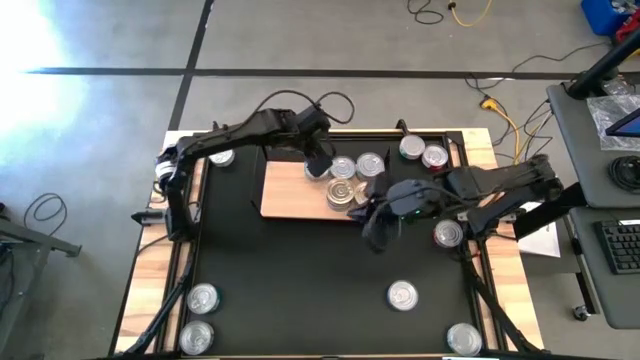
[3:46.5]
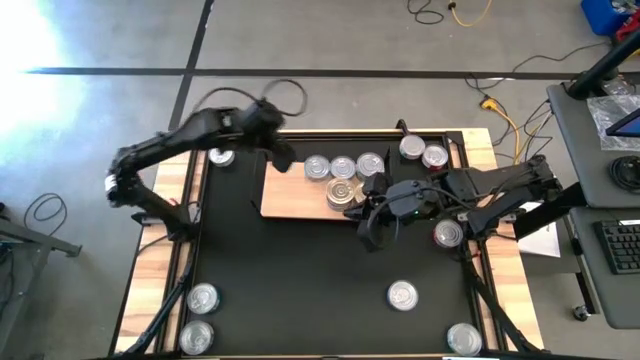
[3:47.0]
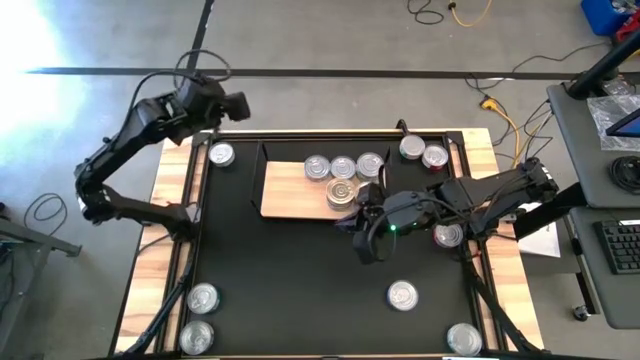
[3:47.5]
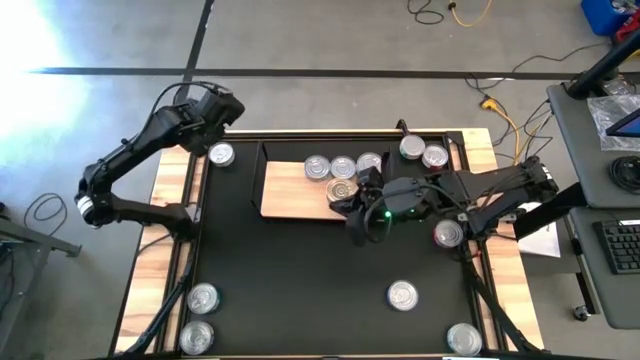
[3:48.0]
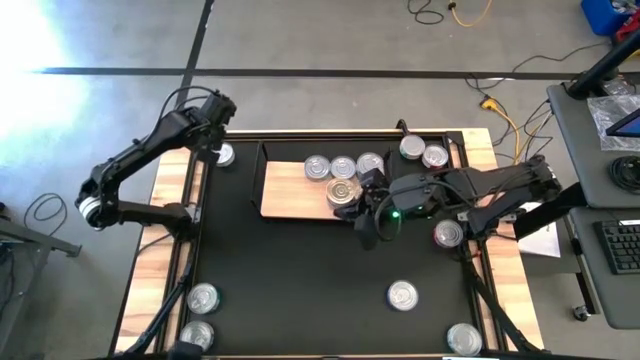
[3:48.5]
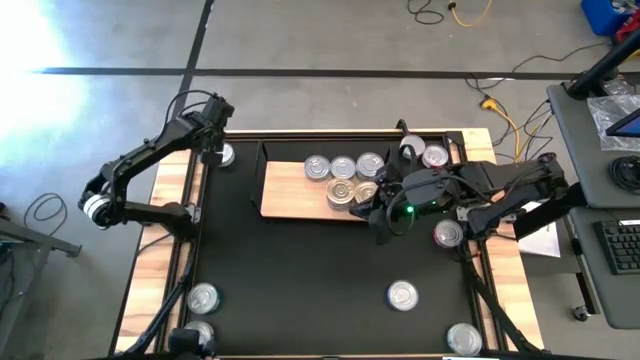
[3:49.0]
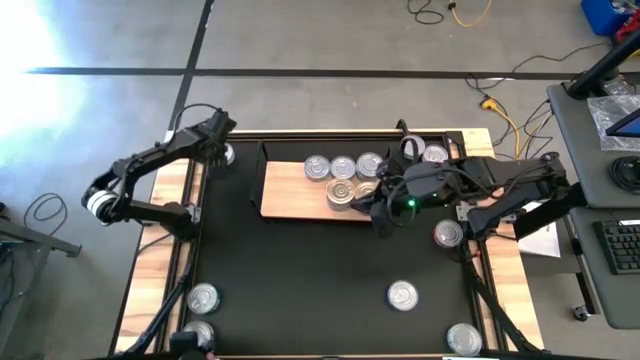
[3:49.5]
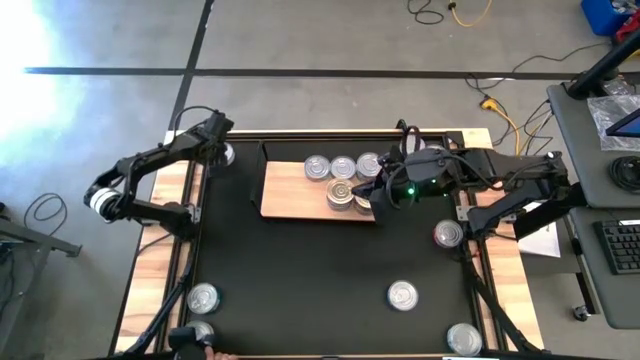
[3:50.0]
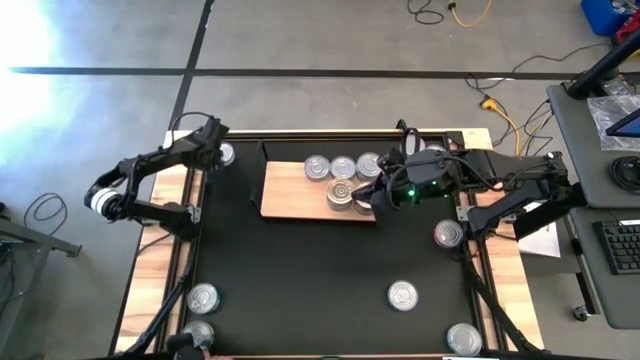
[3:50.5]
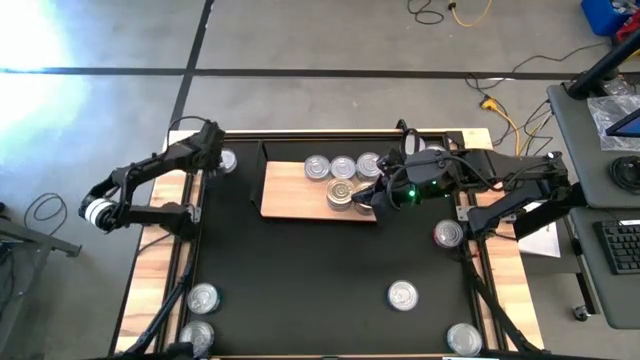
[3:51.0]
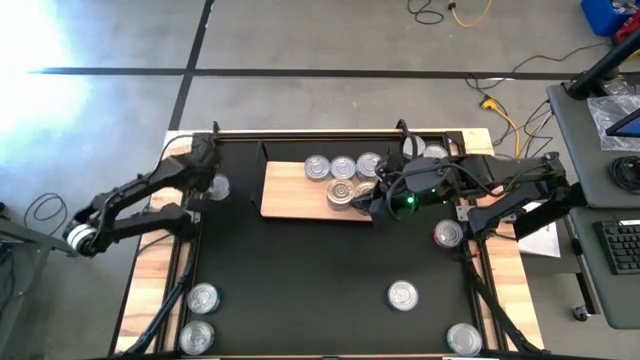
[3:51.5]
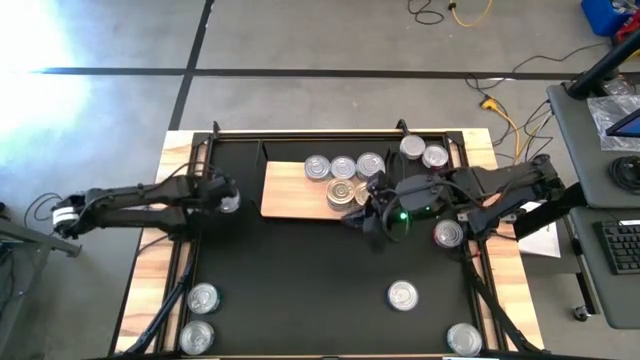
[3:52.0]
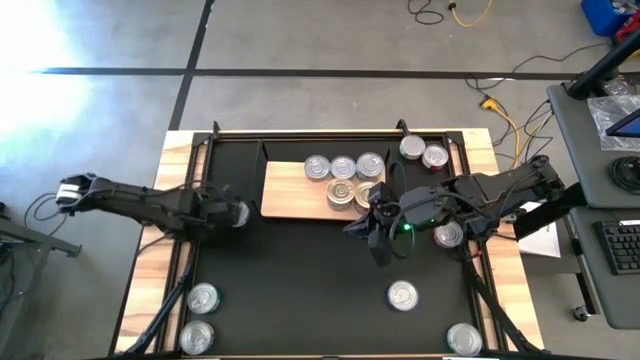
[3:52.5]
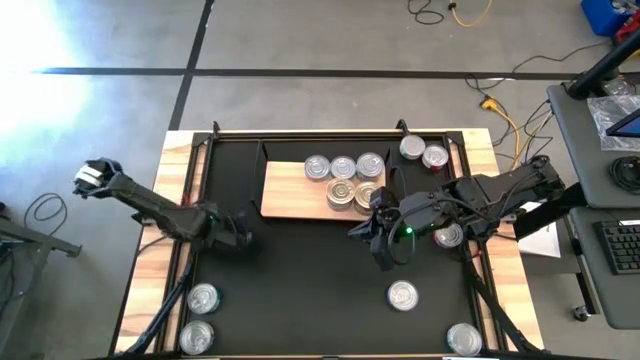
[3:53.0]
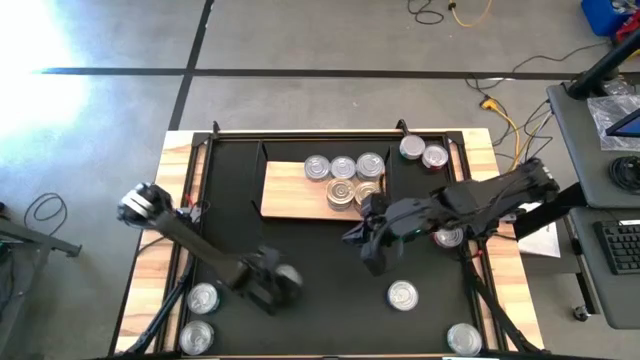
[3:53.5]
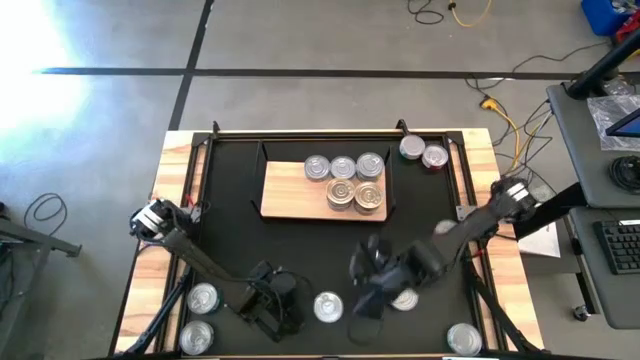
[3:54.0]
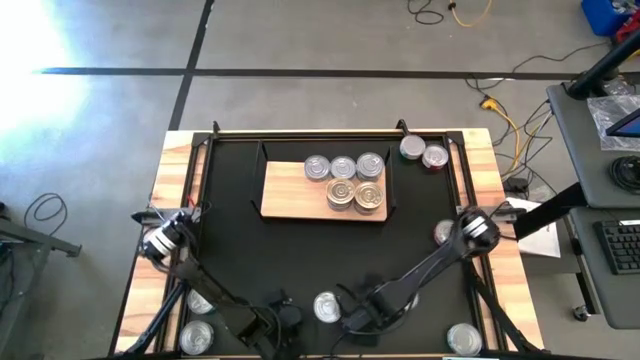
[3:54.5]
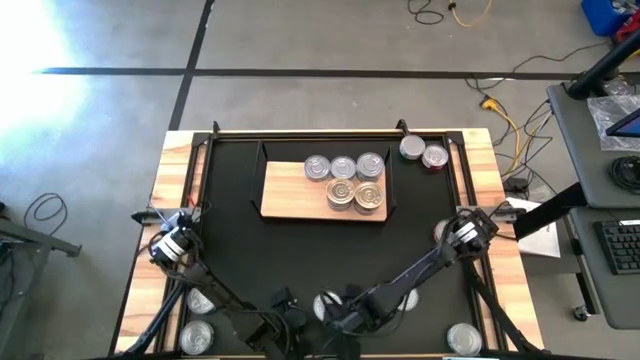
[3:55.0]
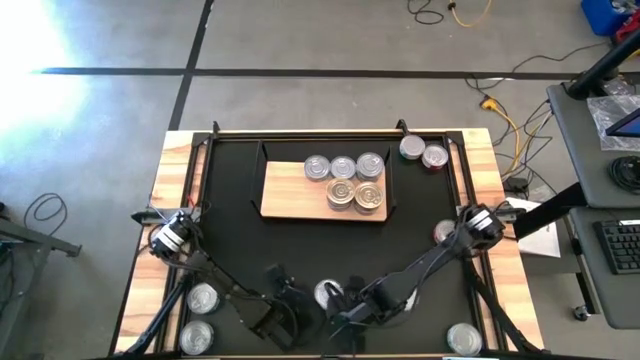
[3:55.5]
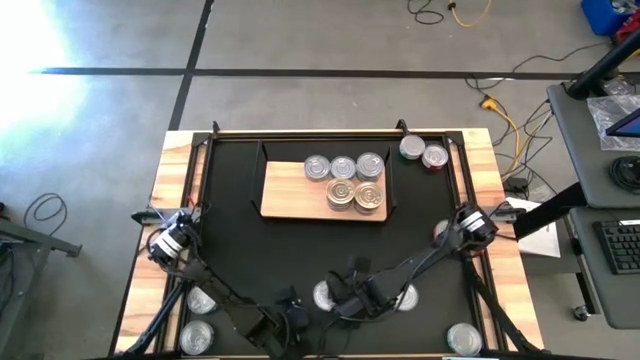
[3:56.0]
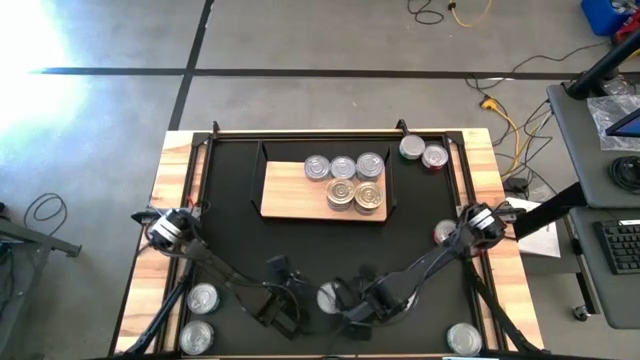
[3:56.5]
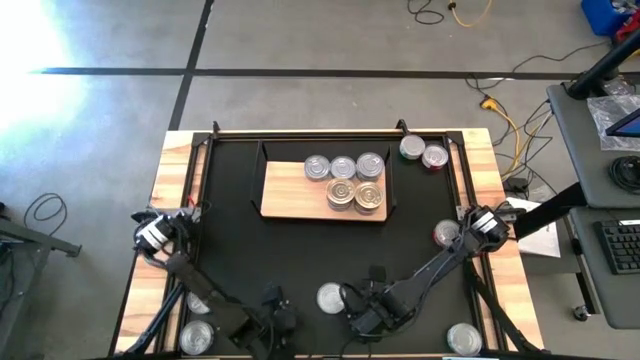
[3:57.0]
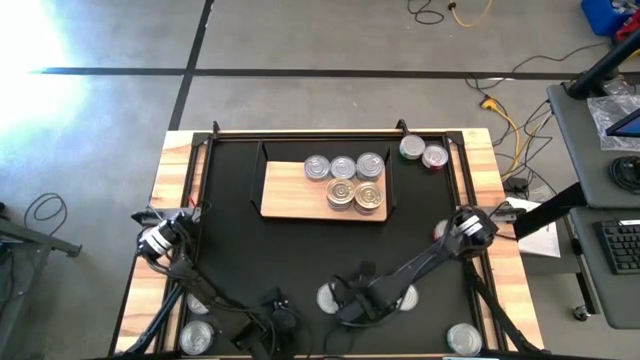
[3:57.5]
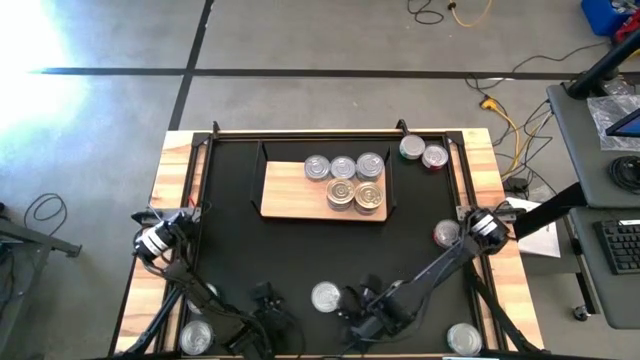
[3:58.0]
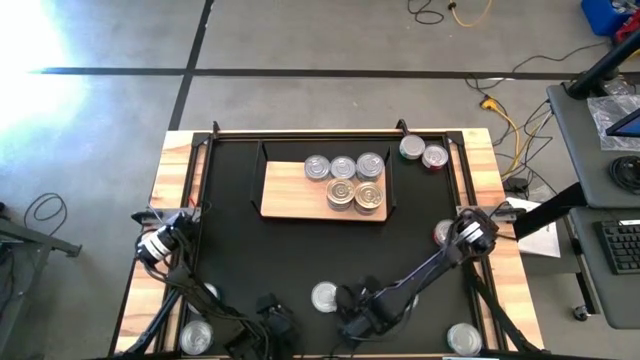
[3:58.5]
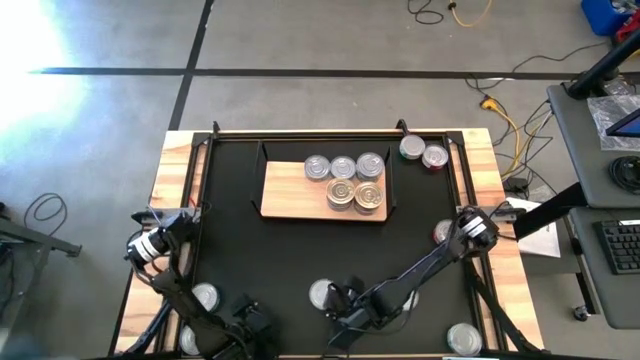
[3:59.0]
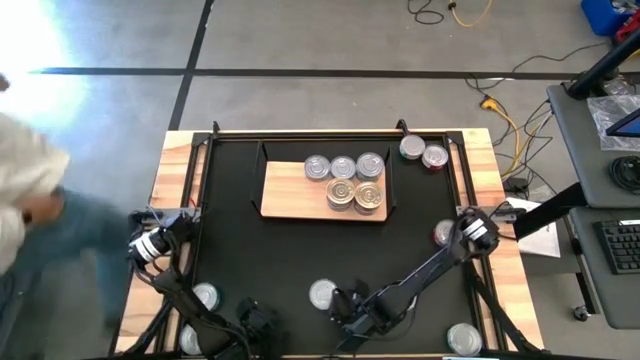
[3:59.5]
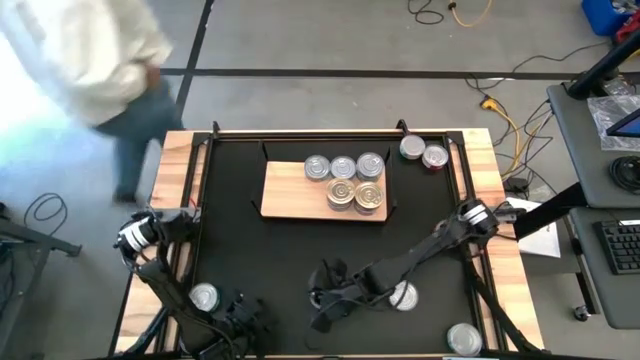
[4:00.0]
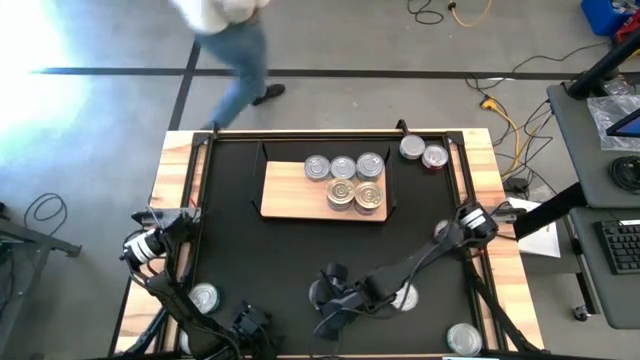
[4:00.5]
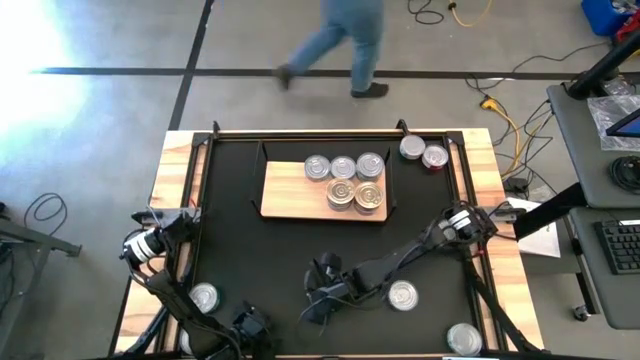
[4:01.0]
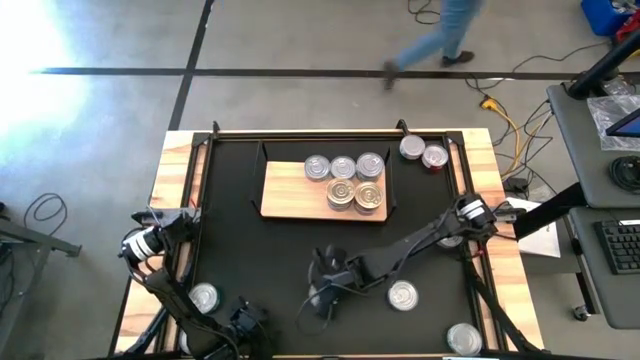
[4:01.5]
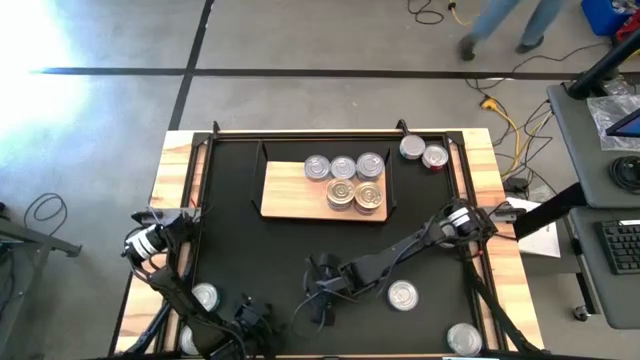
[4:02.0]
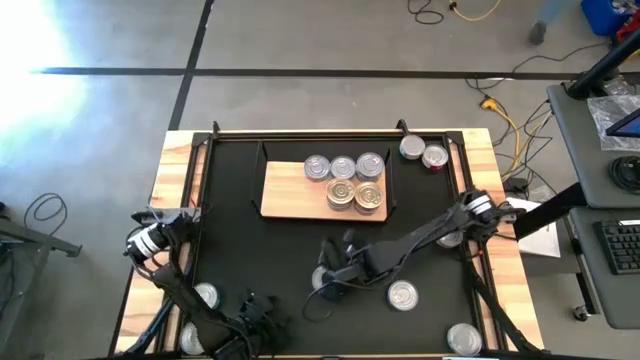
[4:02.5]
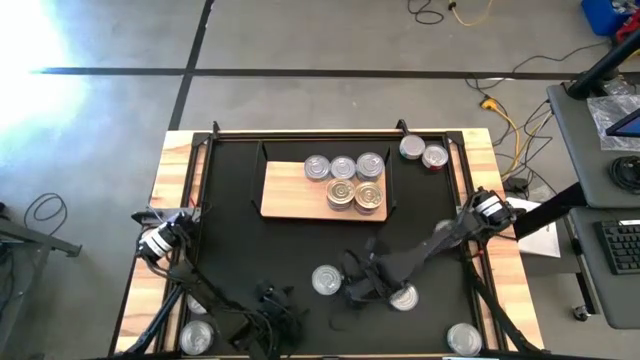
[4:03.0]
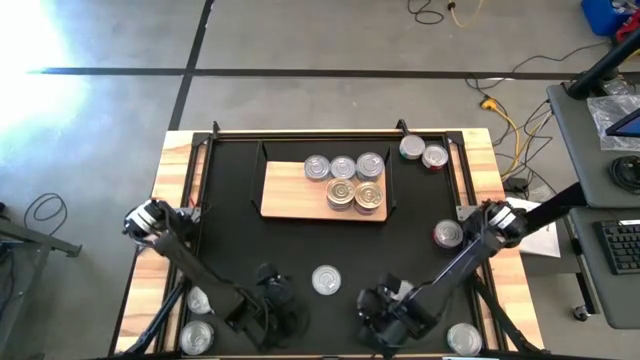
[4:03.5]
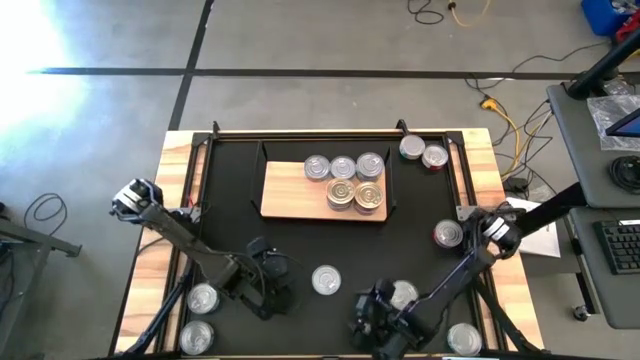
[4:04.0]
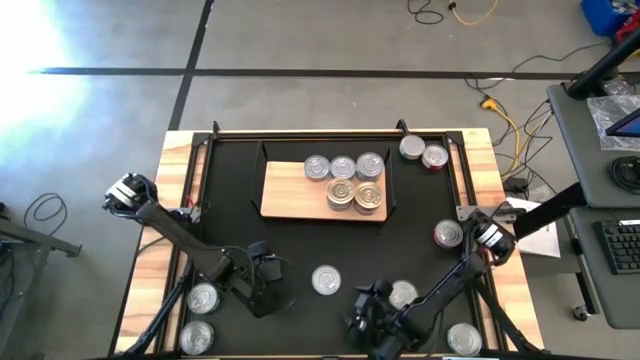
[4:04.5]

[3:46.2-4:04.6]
Task: Stack canned seafood by type on shelf
Stack the top left light blue tuna can on the light blue tuna can

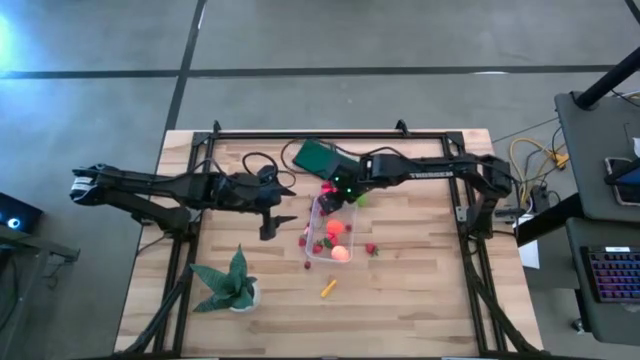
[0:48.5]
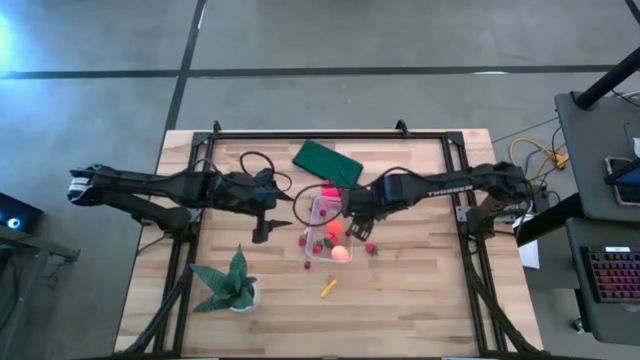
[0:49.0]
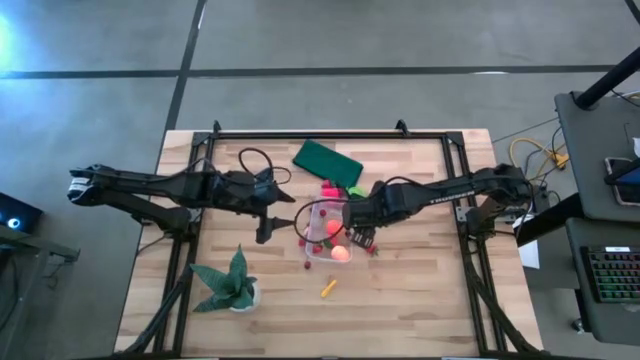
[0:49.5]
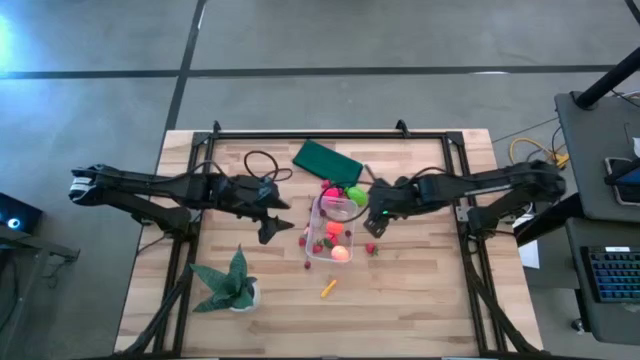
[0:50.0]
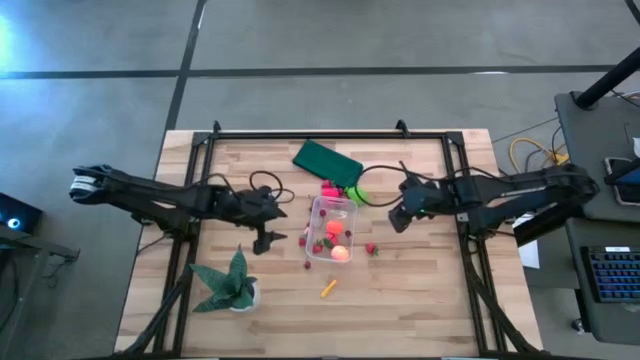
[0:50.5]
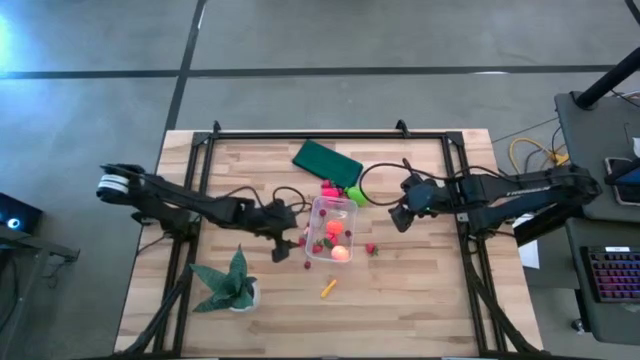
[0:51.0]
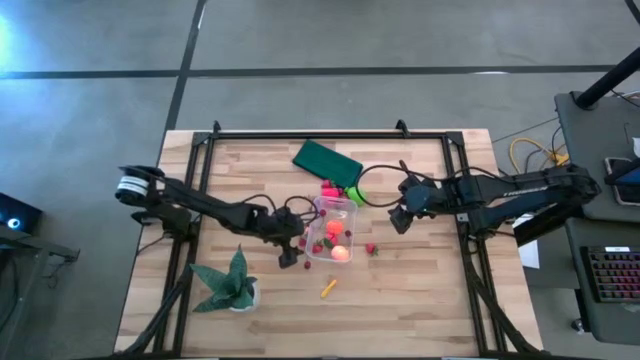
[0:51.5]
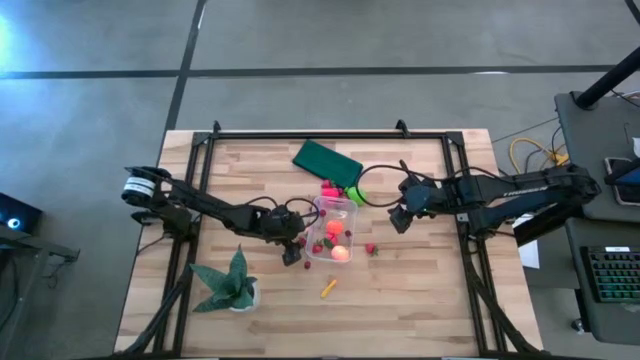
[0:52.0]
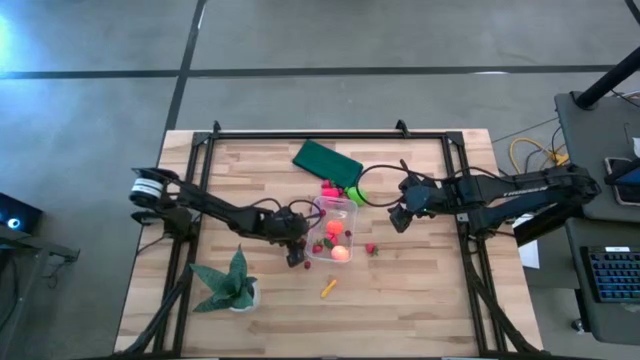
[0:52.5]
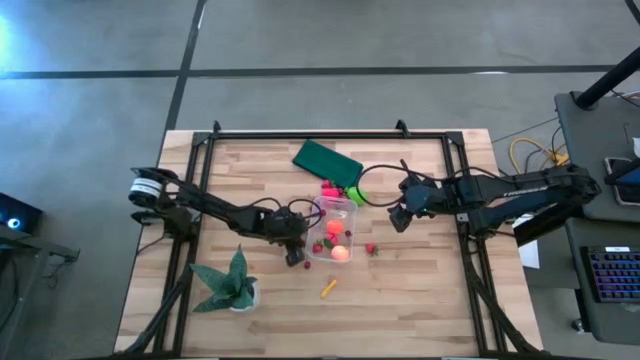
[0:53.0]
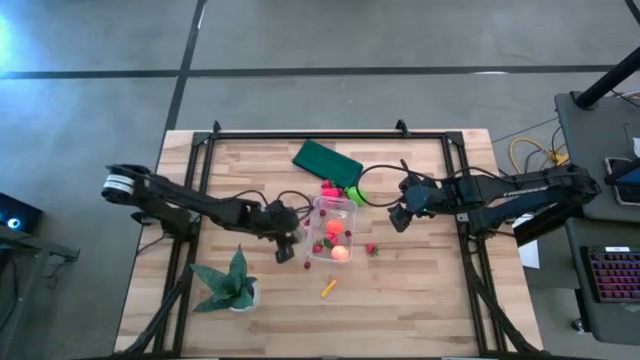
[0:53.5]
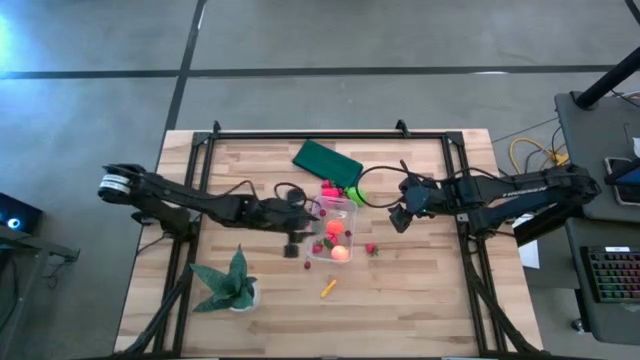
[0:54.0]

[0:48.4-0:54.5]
Task: Pick and placing Produce into tupperware
Put the red strawberry into the transparent bin
